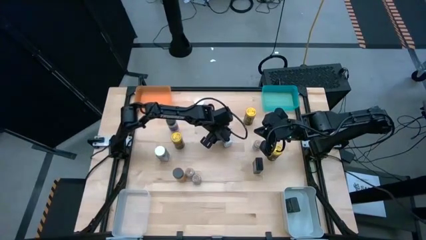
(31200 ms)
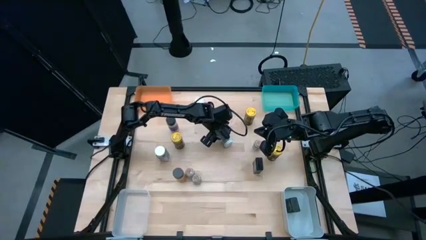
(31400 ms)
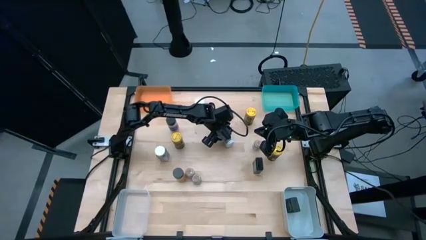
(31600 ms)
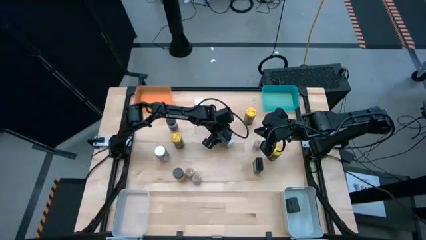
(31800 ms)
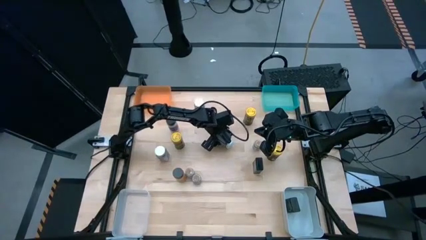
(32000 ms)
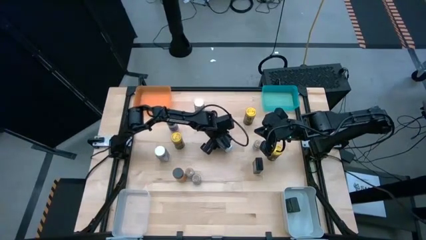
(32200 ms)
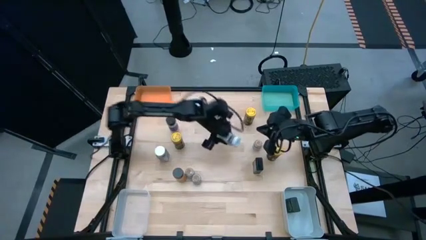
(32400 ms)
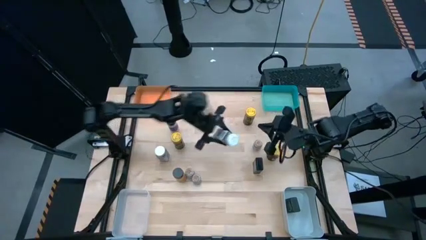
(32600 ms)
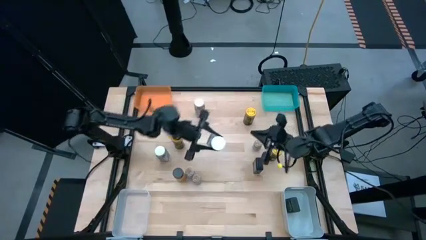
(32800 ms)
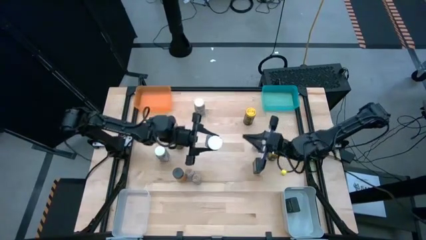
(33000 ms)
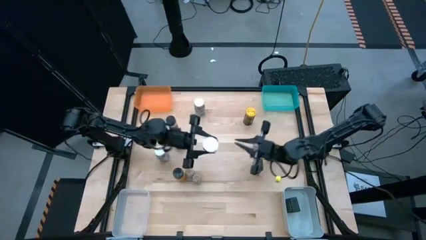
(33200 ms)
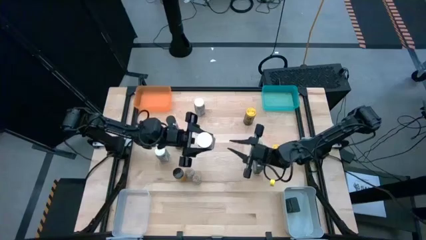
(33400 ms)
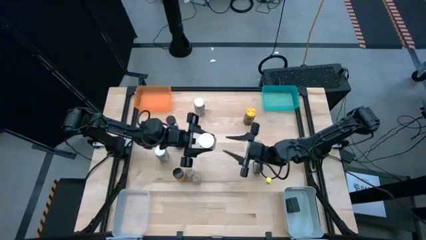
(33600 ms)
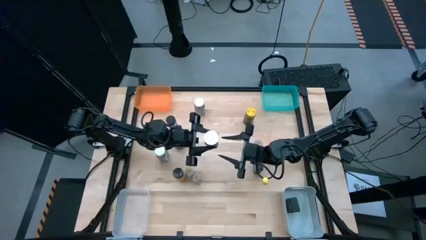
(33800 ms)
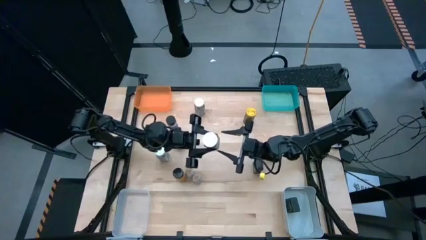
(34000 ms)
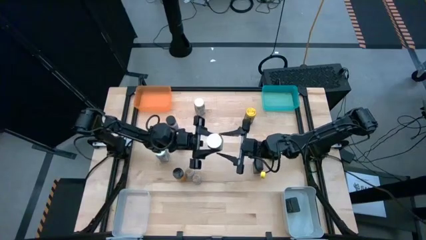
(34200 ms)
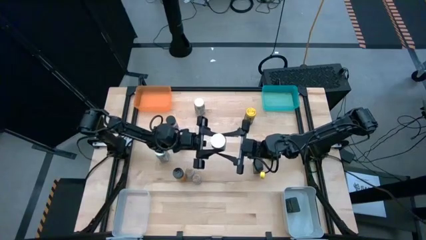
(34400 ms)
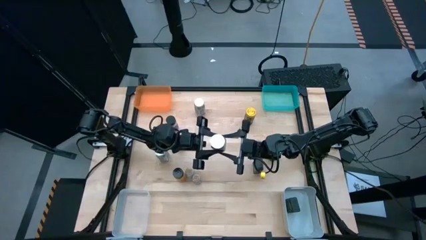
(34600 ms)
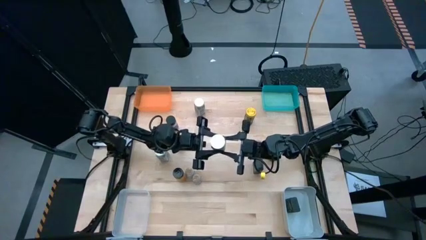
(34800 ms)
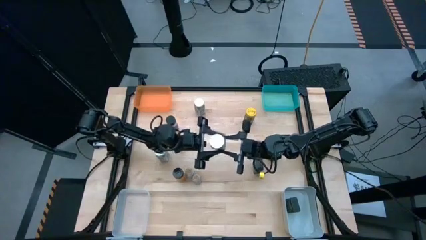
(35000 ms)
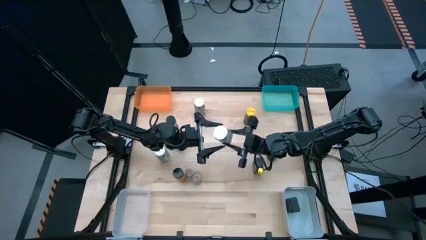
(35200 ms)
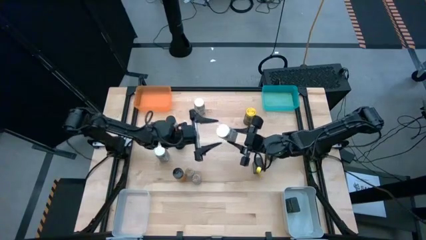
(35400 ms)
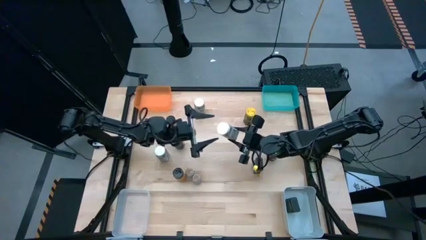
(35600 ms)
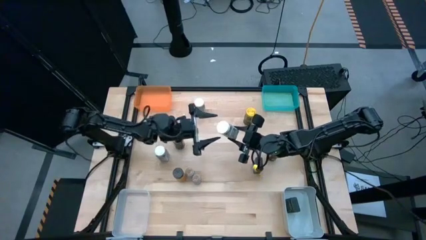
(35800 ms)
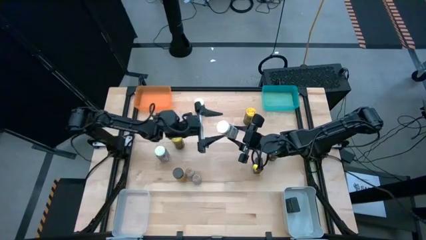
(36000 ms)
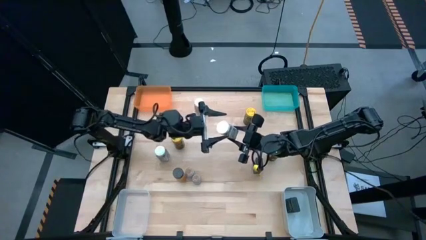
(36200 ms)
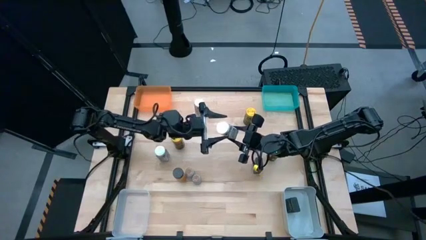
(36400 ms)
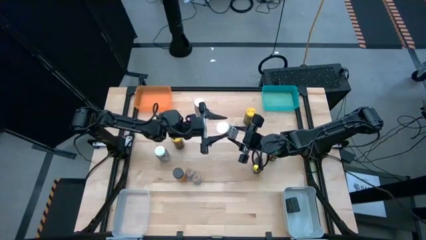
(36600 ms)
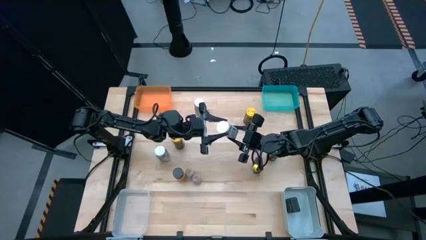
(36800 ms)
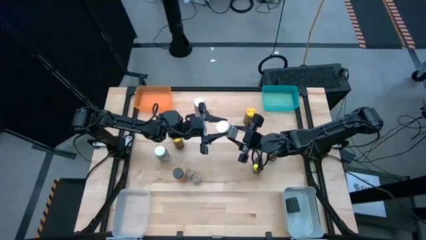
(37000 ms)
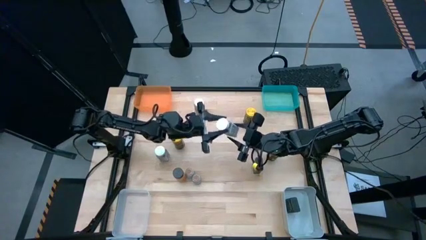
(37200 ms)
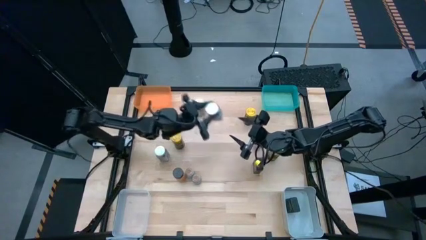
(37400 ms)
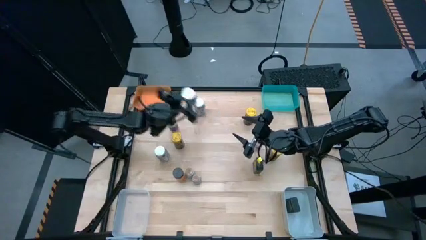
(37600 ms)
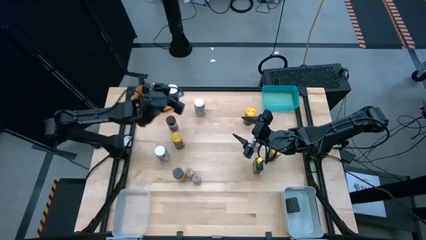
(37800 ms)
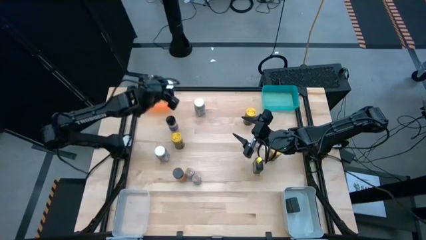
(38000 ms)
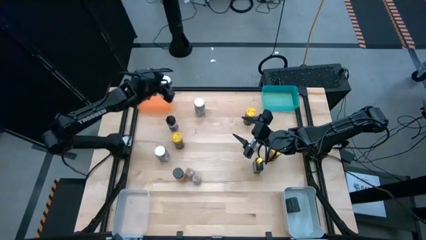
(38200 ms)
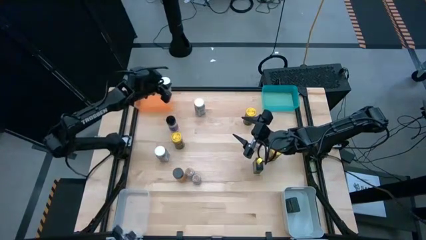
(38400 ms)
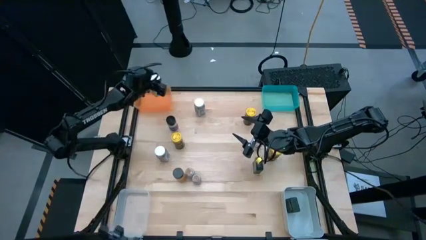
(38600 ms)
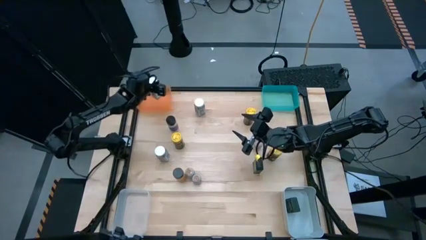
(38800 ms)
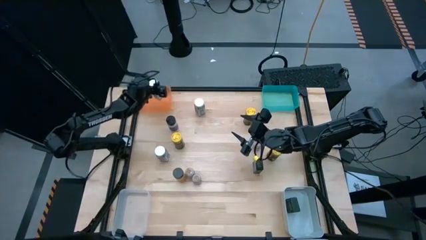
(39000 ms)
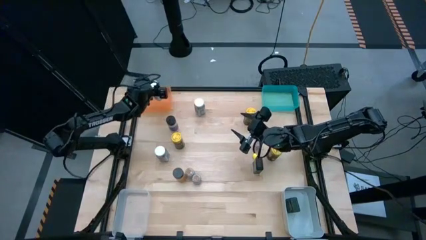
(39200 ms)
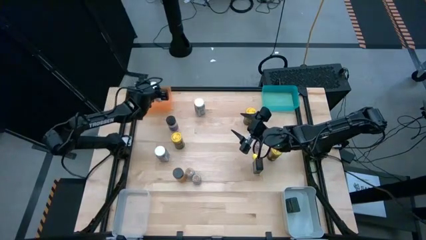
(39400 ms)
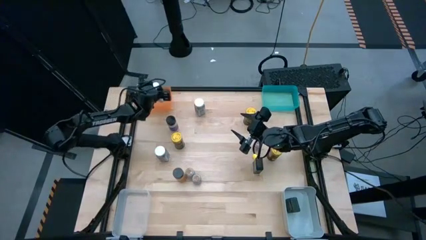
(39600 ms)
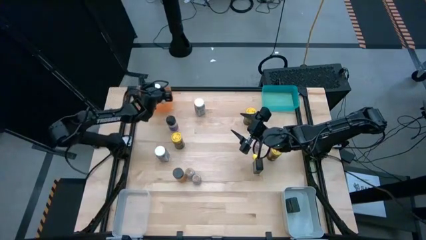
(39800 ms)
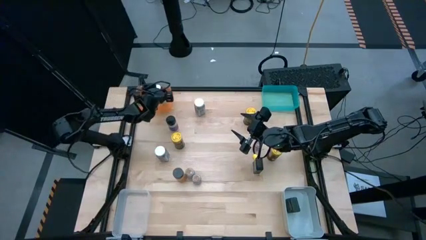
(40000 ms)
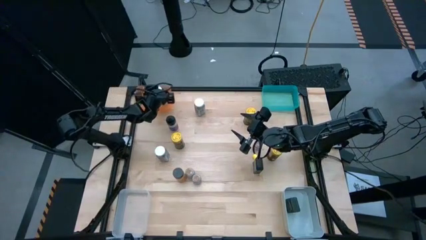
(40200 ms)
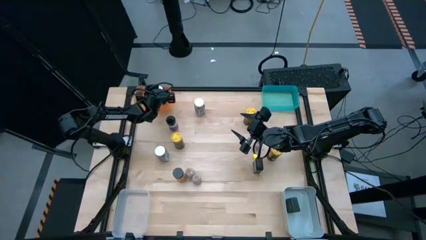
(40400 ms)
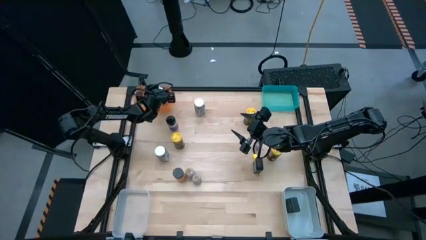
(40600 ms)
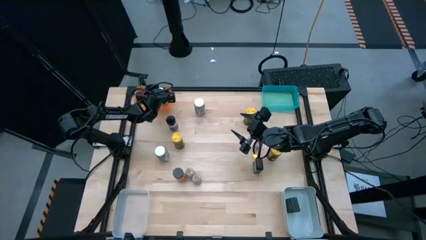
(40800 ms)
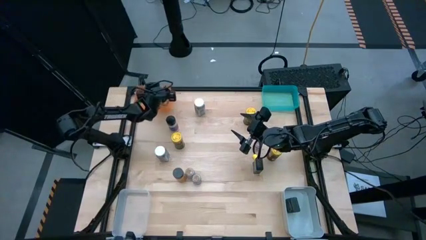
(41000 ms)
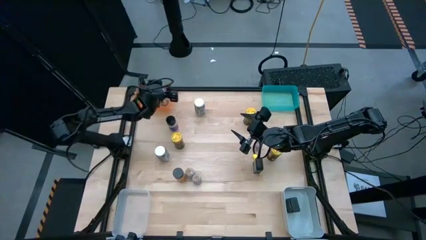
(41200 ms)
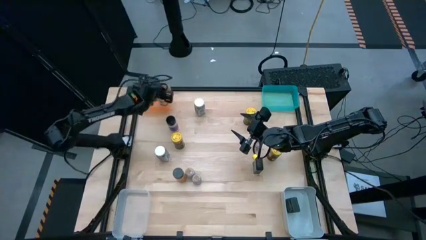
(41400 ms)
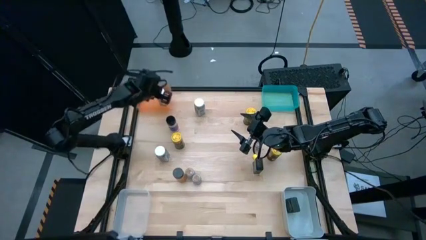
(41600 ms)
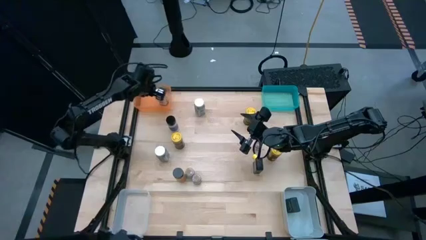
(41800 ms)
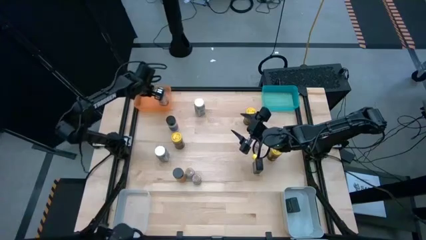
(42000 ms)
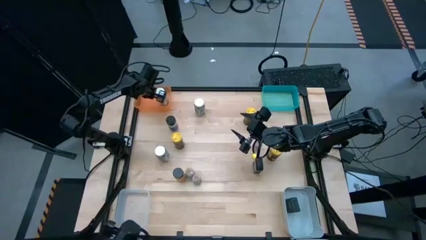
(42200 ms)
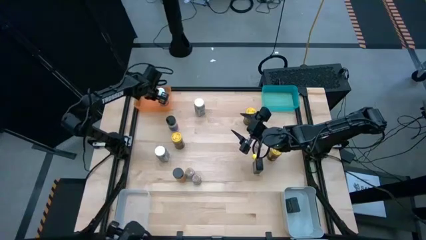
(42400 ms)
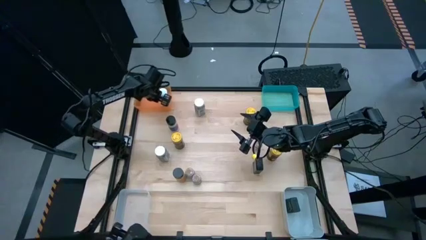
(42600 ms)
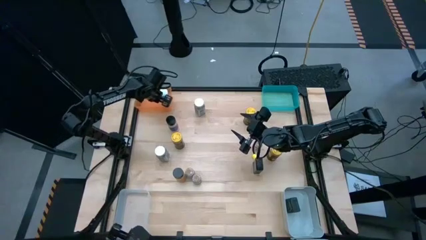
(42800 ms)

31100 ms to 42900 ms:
Task: Sort spices by type
Put the white seasoning bottle into the orange bin
